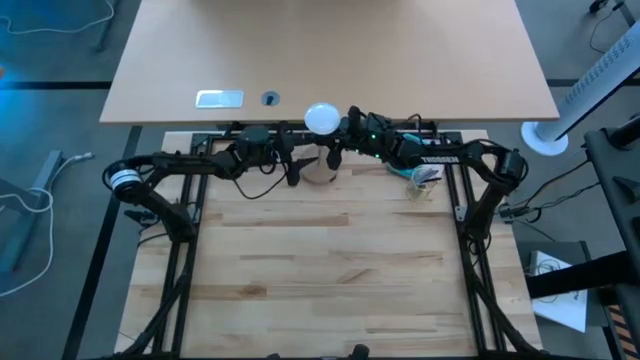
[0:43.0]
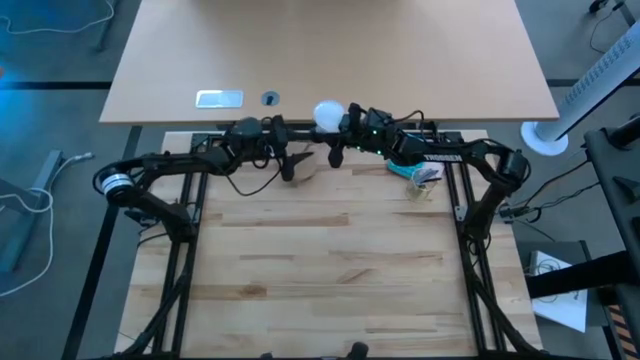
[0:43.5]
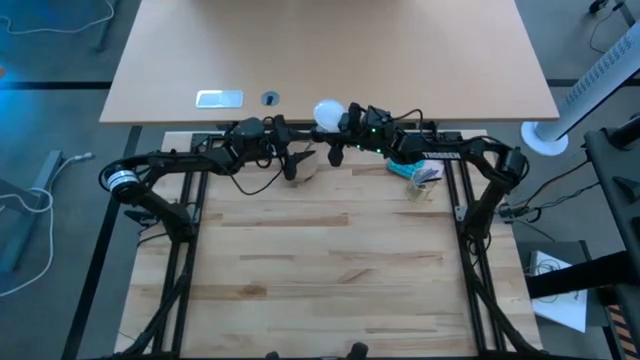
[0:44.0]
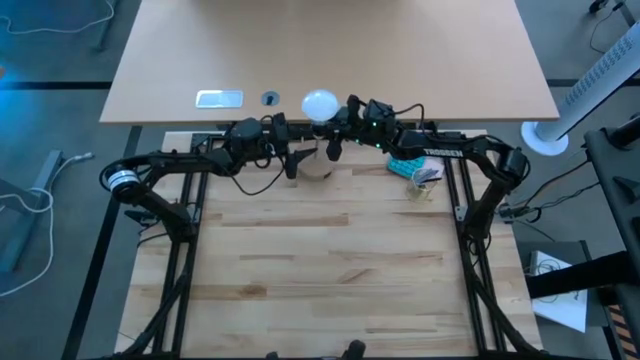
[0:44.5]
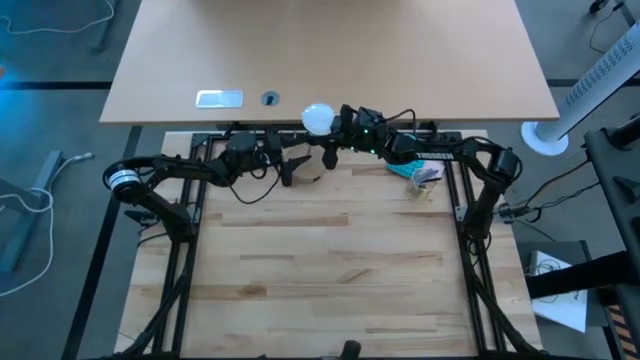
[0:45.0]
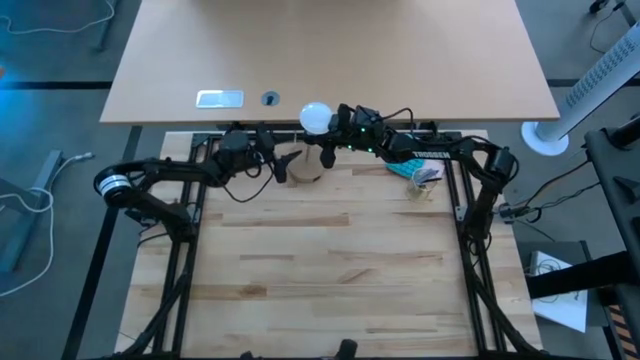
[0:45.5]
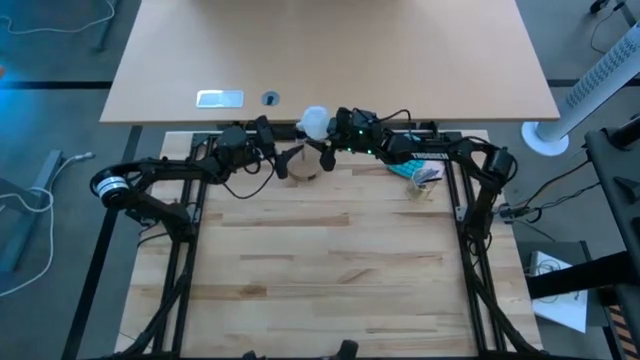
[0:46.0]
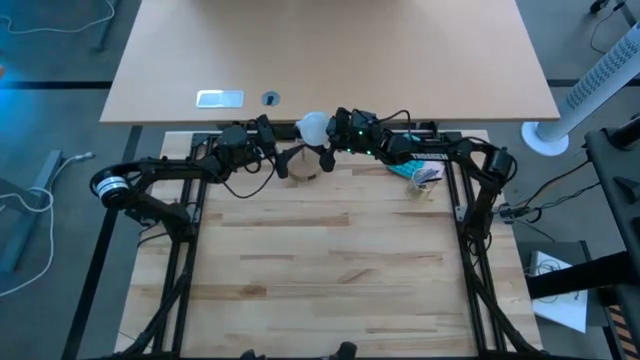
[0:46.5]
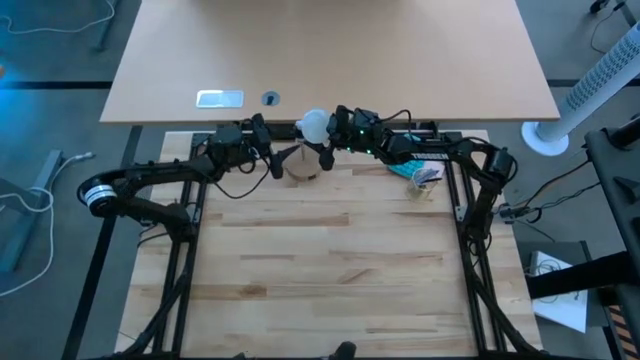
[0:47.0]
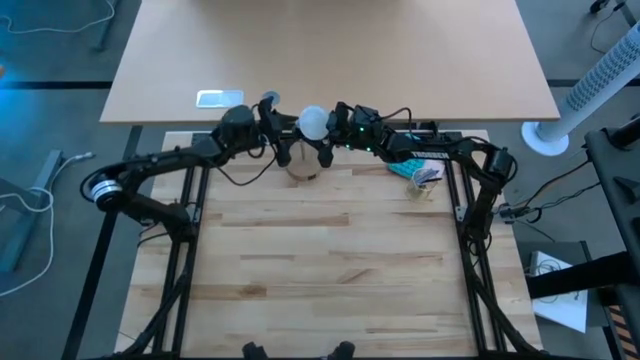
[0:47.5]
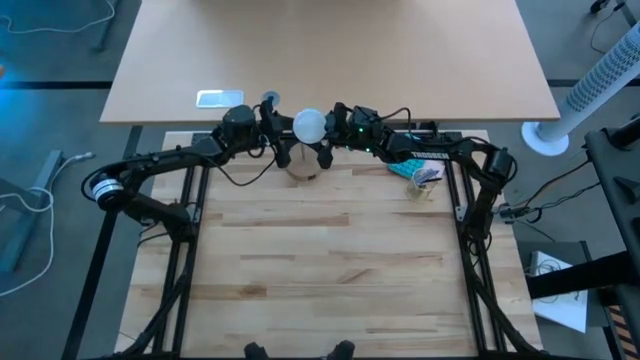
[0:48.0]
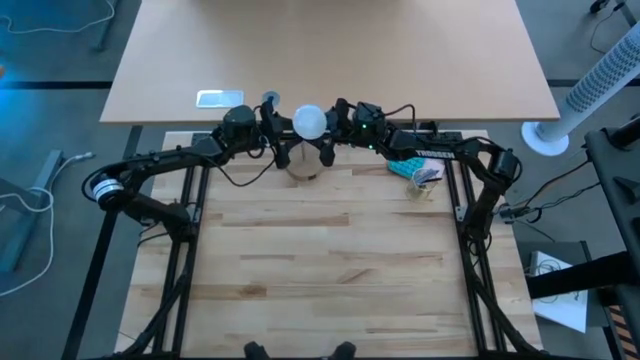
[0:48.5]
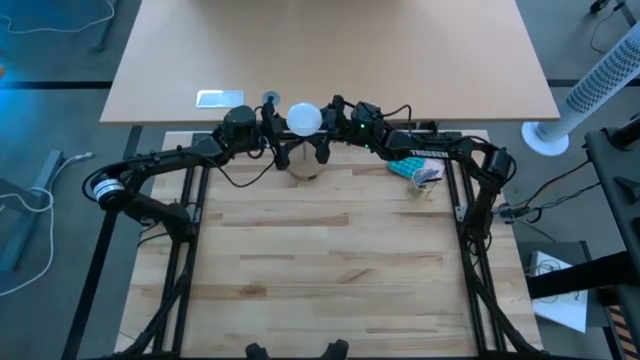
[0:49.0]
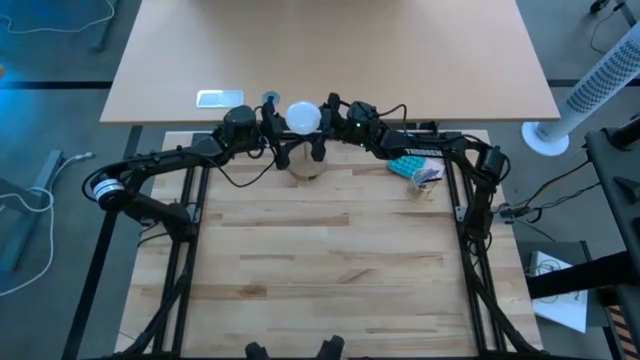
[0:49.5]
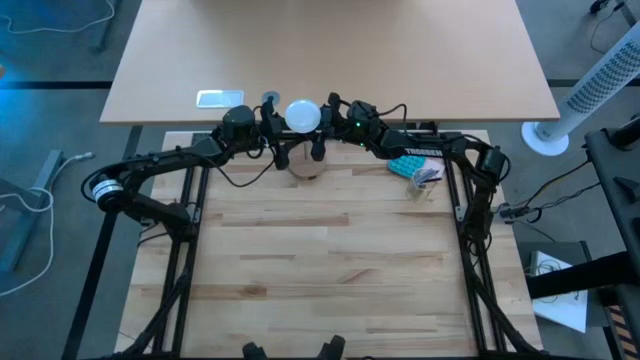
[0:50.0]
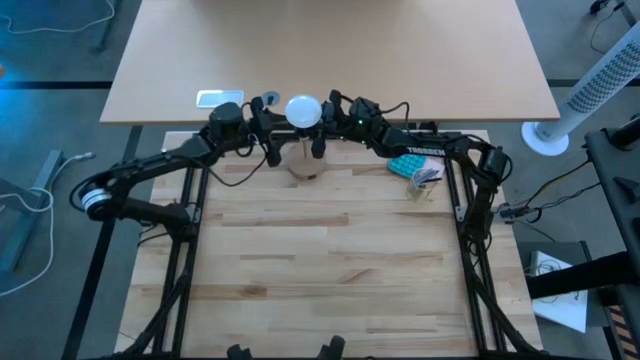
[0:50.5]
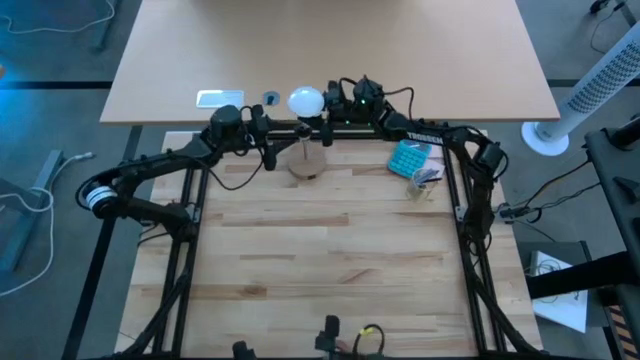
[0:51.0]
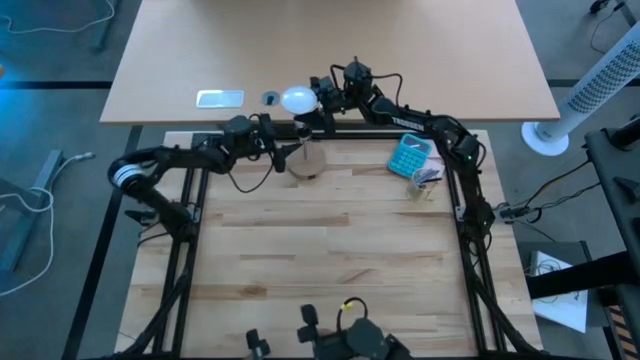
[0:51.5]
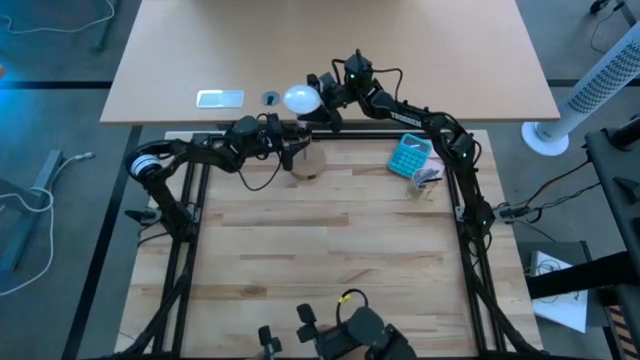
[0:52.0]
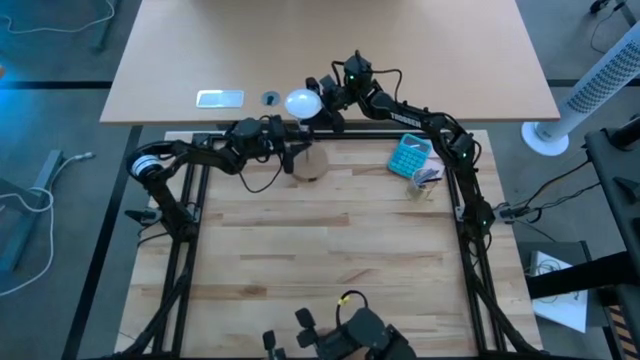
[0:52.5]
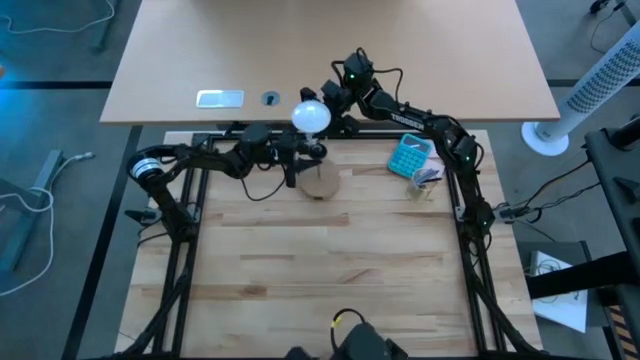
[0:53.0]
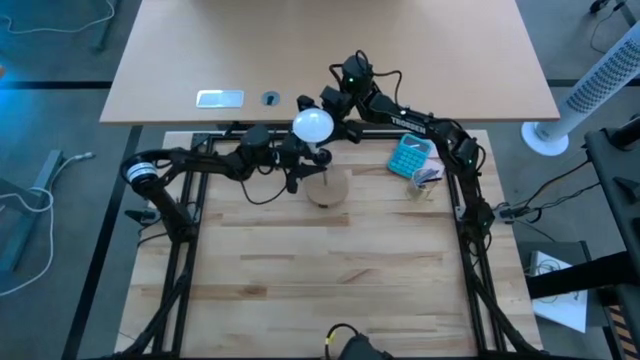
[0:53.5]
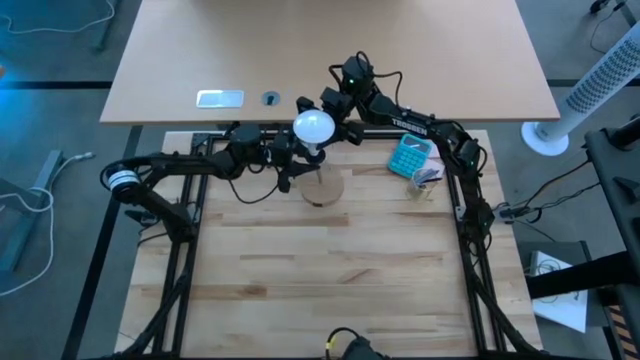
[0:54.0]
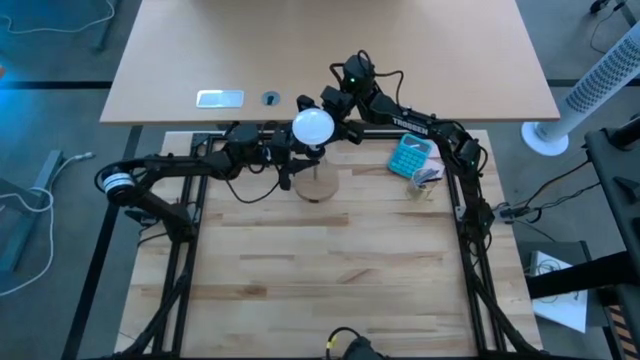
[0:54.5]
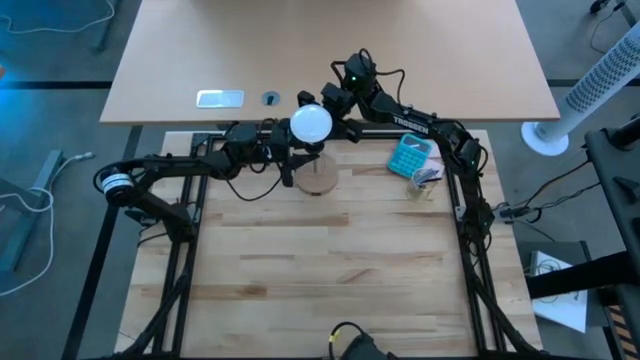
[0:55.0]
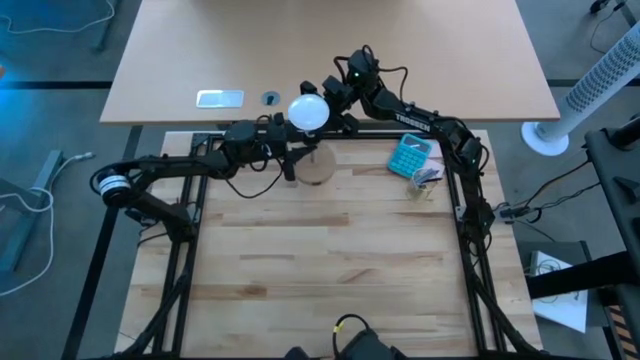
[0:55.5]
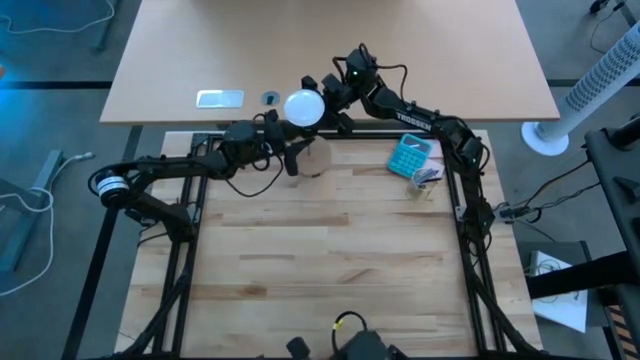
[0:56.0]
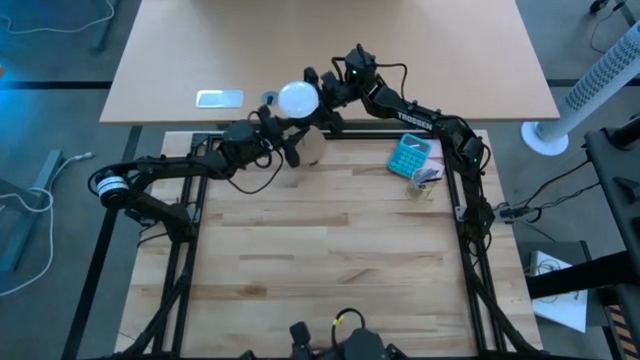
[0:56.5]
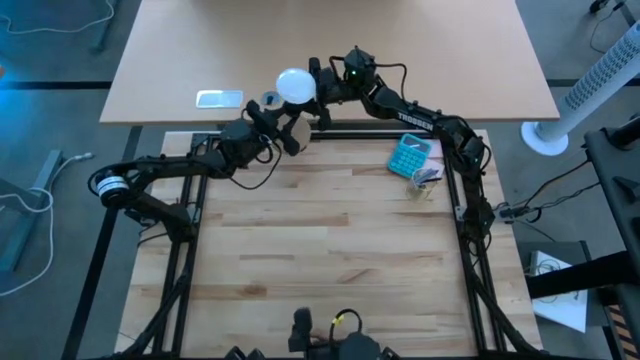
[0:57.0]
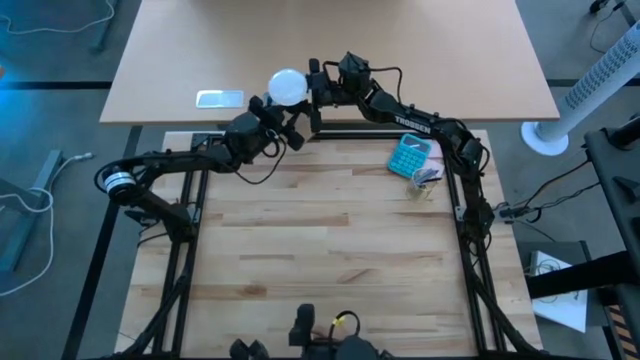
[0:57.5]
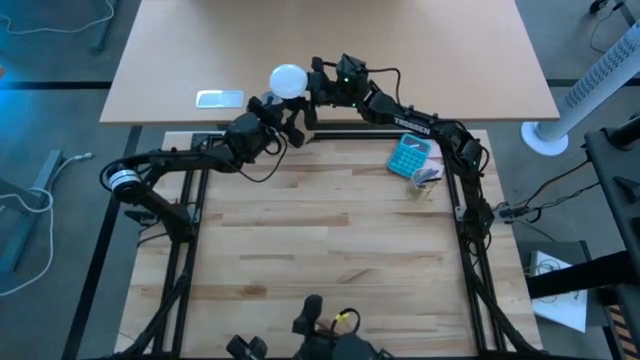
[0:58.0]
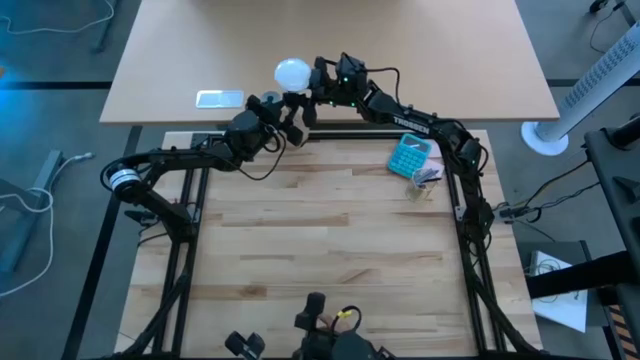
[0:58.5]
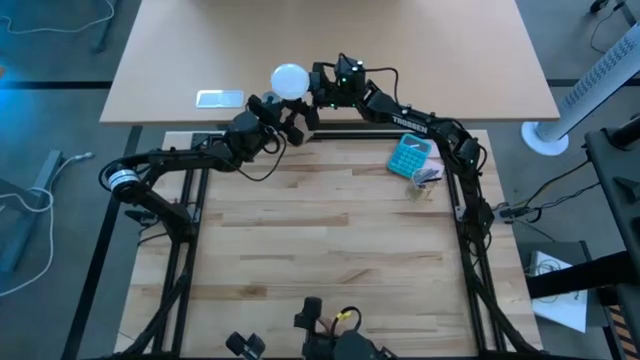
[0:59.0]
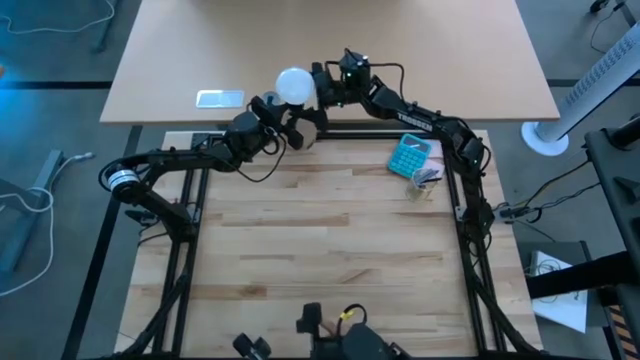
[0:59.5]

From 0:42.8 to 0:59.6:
Task: Screw lightbulb
Insert the light bulb into the table lamp
